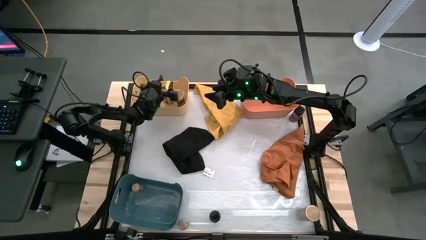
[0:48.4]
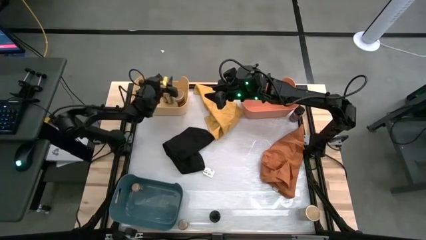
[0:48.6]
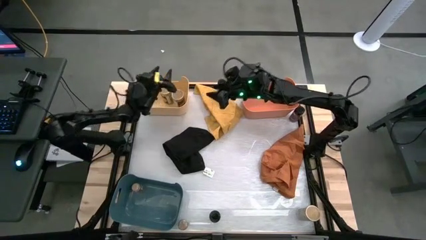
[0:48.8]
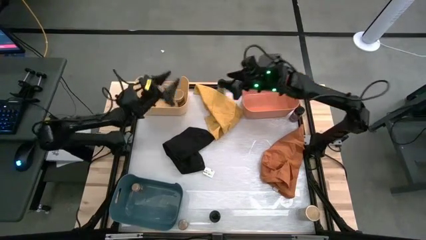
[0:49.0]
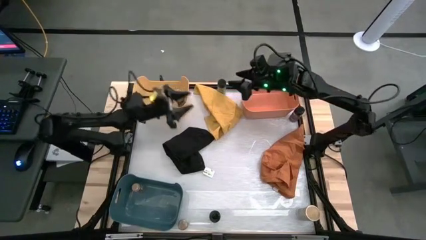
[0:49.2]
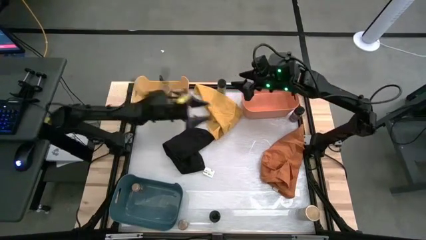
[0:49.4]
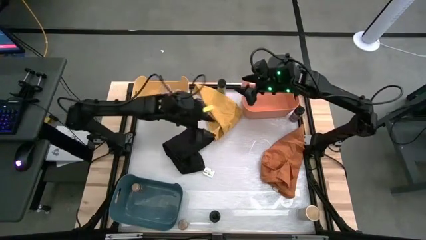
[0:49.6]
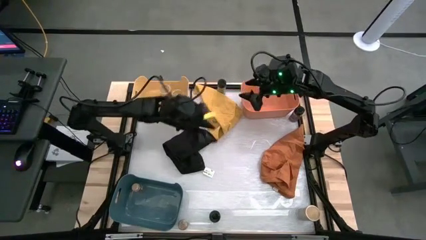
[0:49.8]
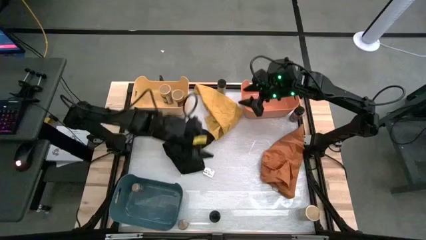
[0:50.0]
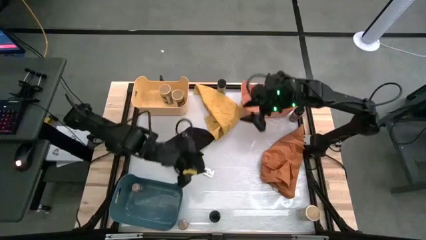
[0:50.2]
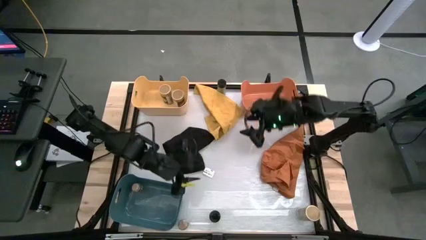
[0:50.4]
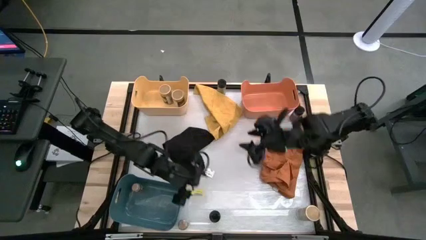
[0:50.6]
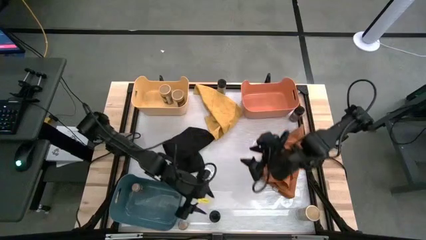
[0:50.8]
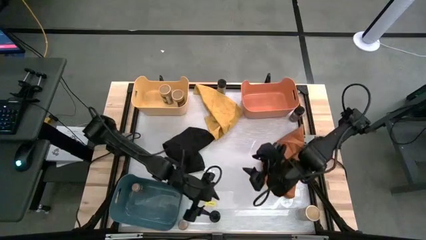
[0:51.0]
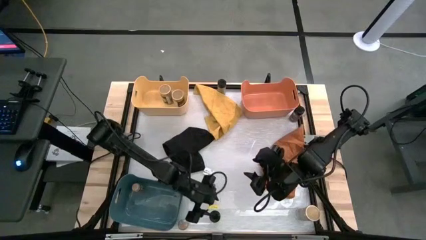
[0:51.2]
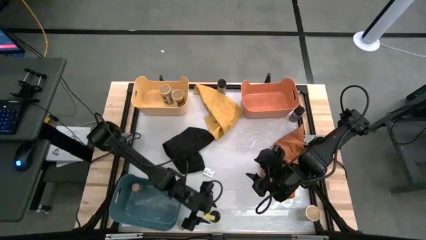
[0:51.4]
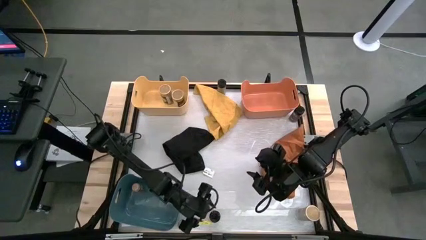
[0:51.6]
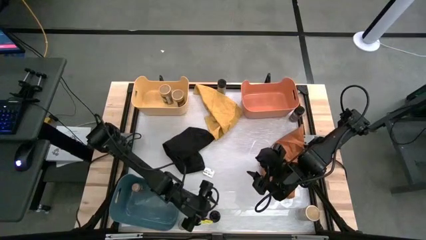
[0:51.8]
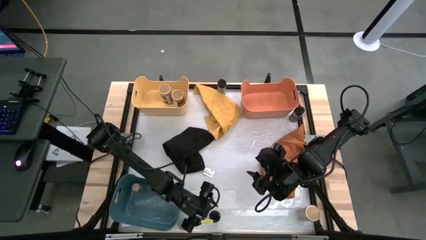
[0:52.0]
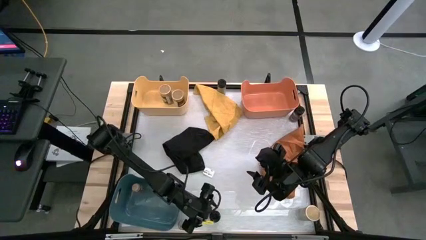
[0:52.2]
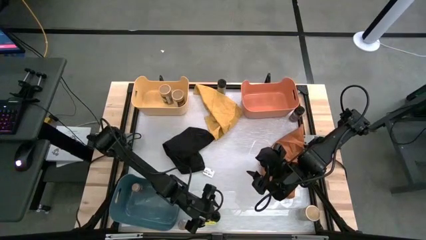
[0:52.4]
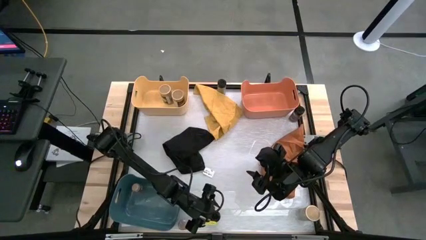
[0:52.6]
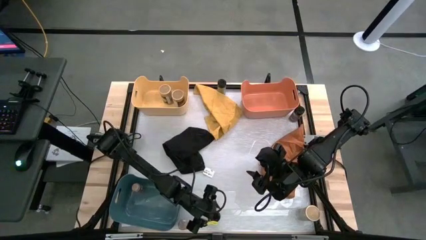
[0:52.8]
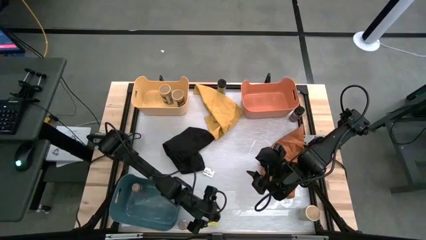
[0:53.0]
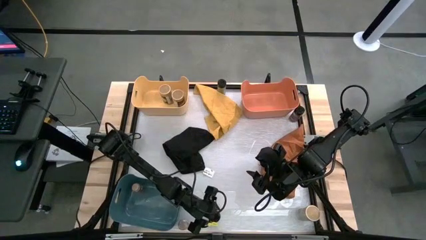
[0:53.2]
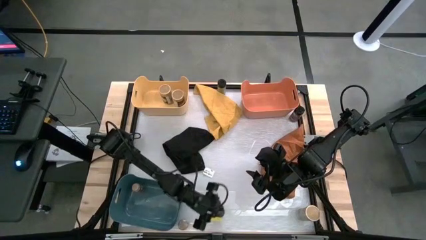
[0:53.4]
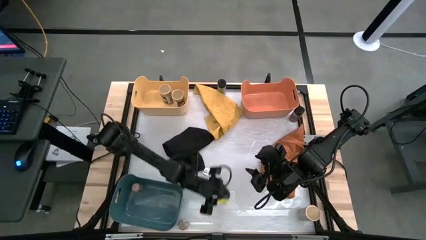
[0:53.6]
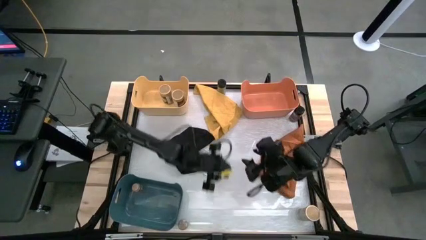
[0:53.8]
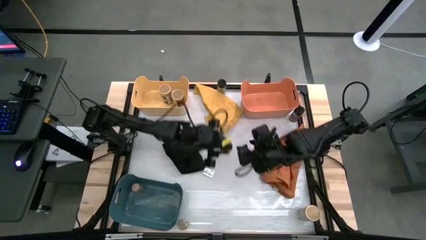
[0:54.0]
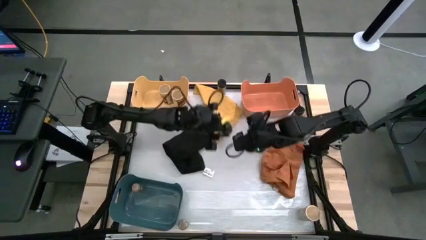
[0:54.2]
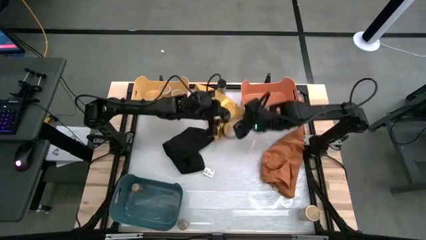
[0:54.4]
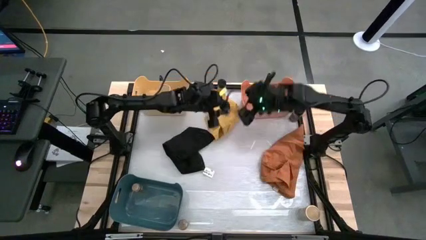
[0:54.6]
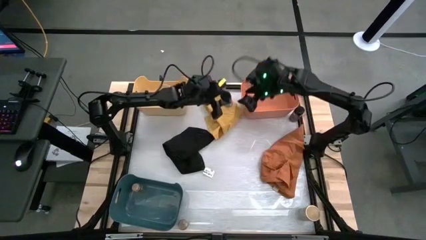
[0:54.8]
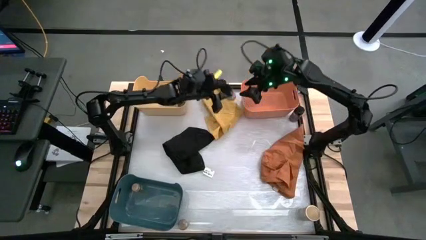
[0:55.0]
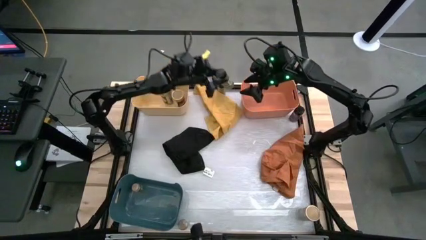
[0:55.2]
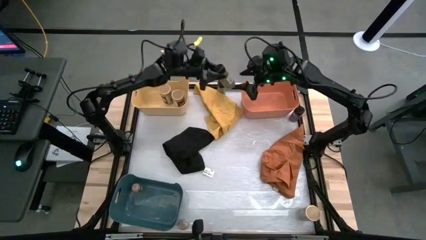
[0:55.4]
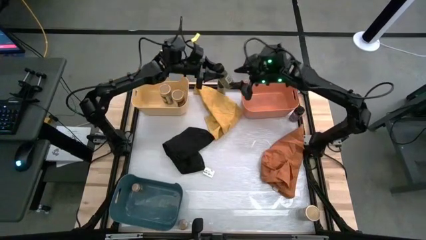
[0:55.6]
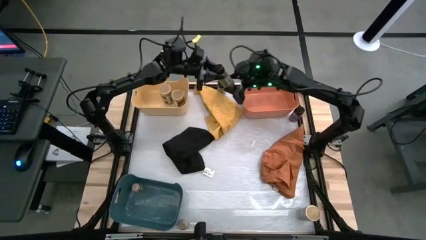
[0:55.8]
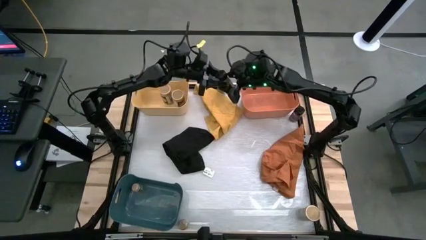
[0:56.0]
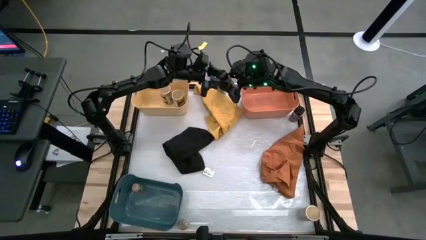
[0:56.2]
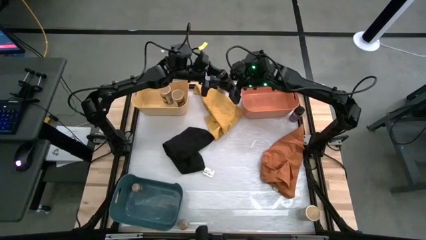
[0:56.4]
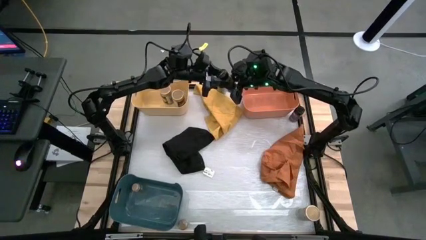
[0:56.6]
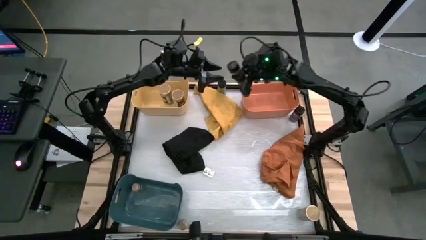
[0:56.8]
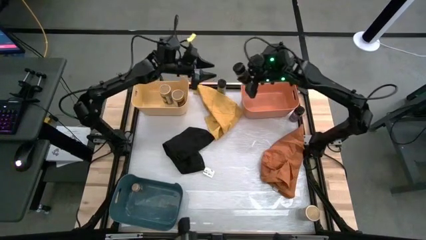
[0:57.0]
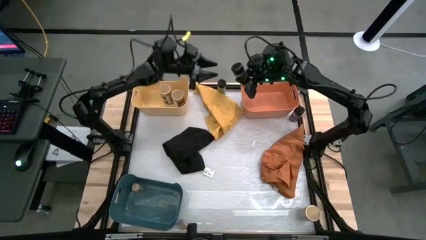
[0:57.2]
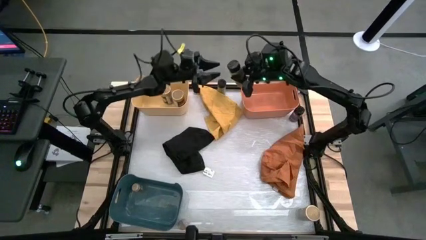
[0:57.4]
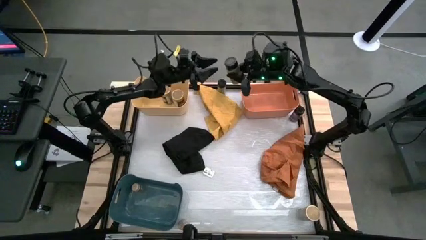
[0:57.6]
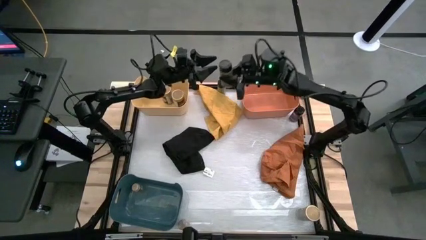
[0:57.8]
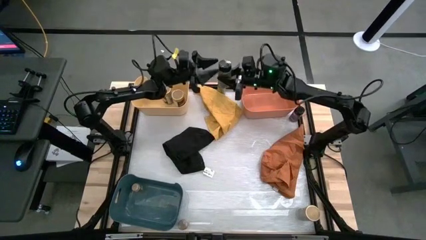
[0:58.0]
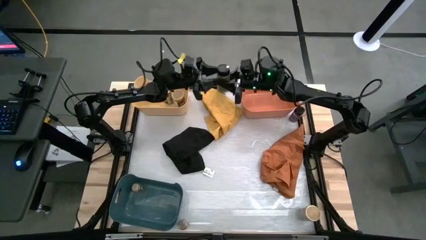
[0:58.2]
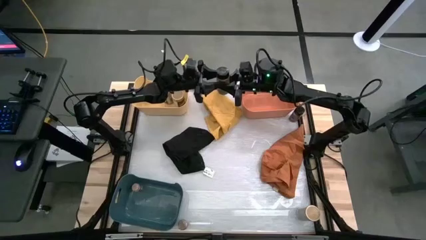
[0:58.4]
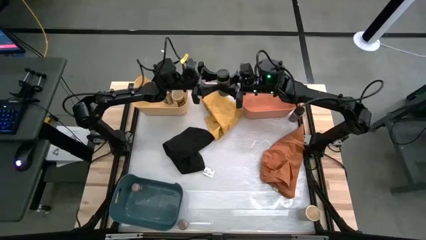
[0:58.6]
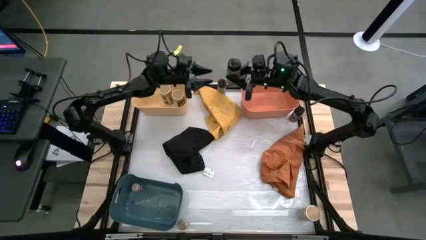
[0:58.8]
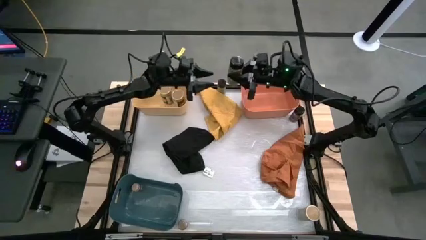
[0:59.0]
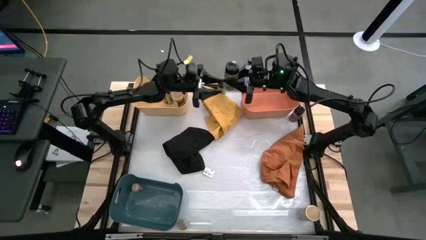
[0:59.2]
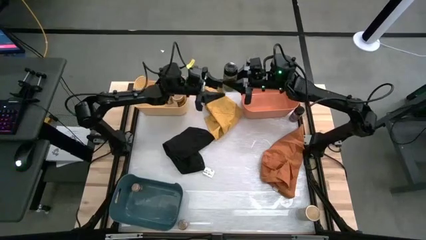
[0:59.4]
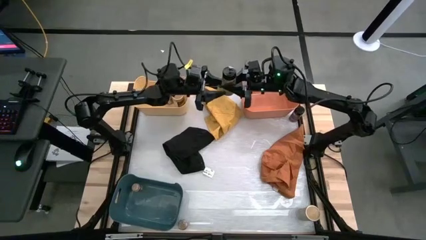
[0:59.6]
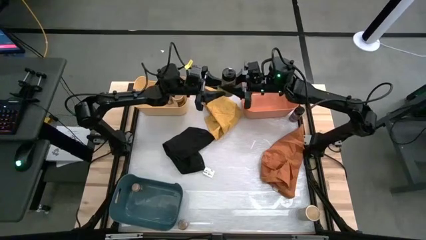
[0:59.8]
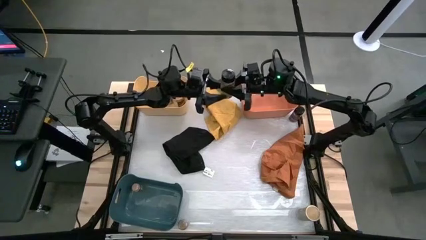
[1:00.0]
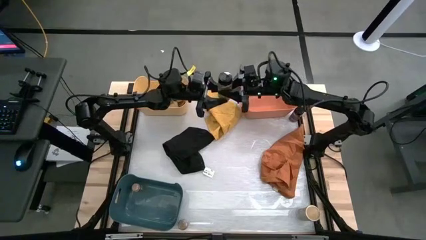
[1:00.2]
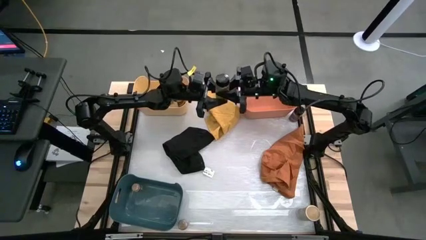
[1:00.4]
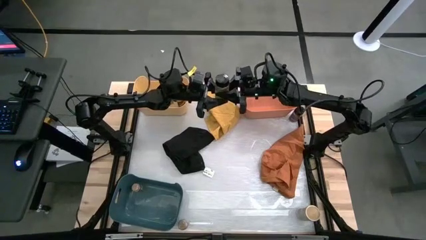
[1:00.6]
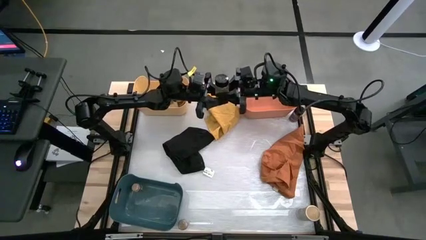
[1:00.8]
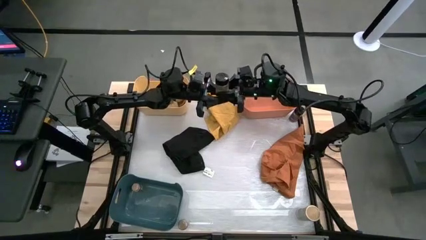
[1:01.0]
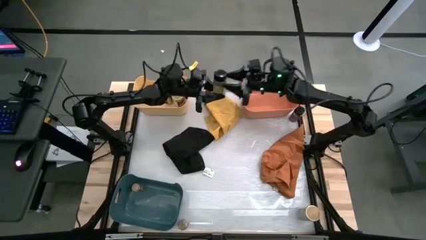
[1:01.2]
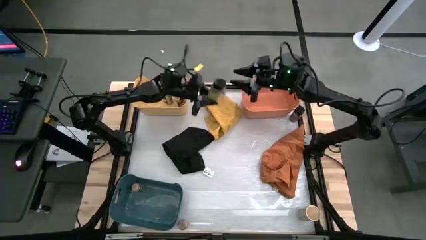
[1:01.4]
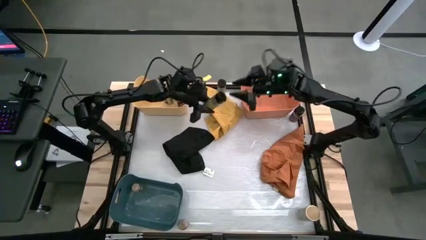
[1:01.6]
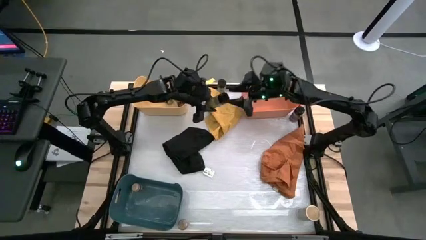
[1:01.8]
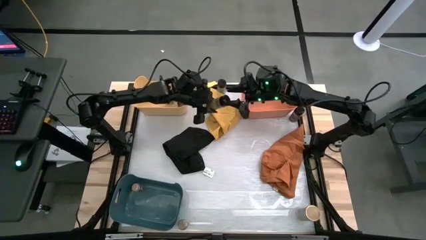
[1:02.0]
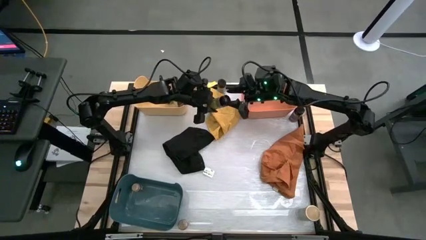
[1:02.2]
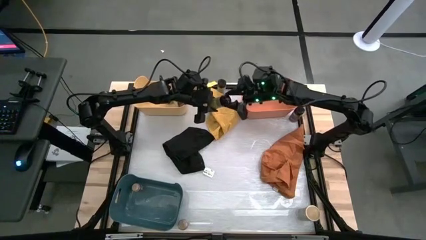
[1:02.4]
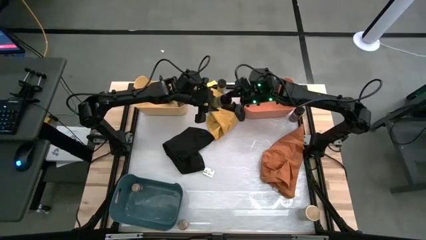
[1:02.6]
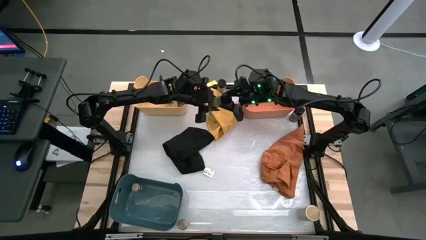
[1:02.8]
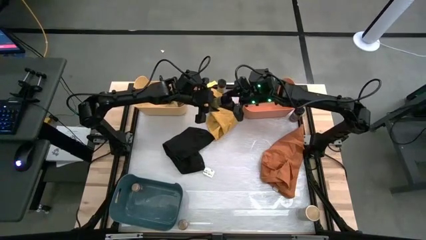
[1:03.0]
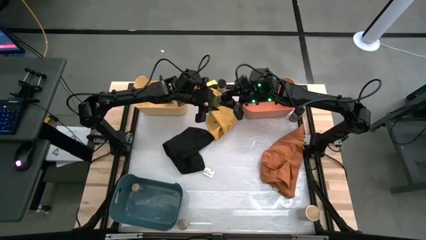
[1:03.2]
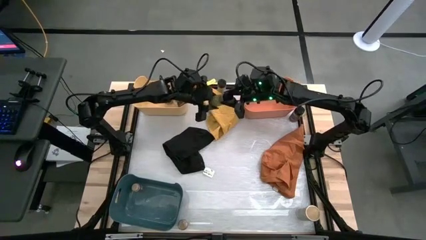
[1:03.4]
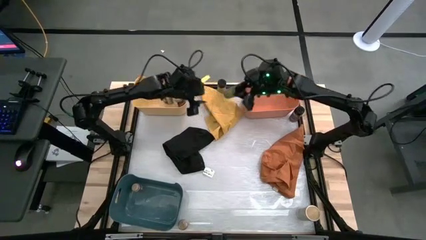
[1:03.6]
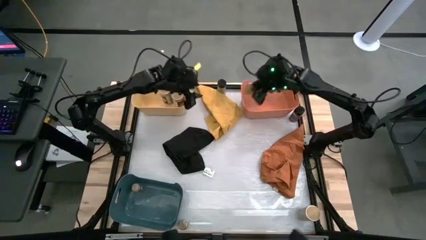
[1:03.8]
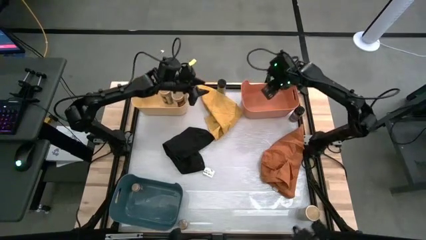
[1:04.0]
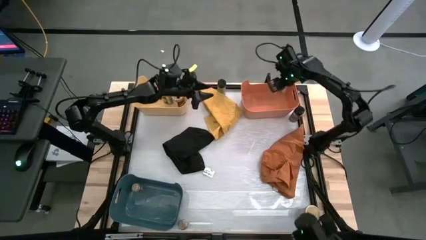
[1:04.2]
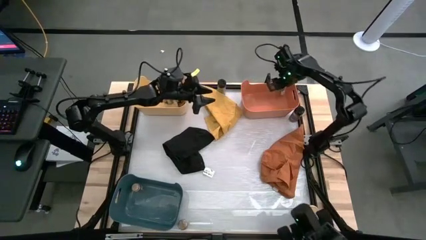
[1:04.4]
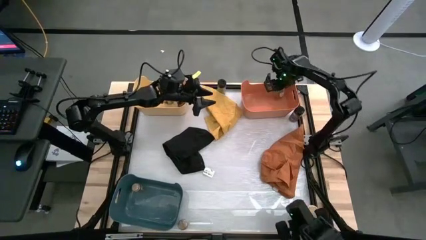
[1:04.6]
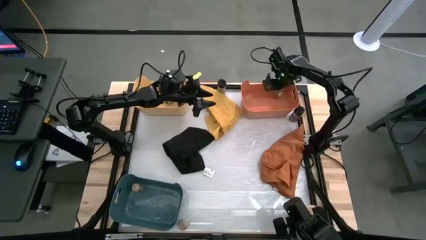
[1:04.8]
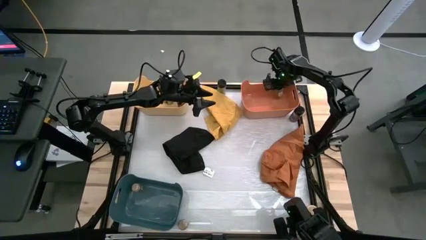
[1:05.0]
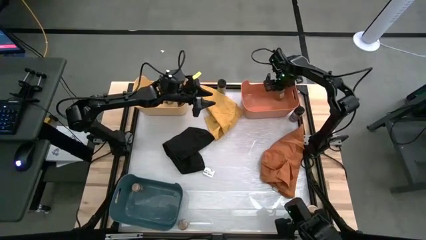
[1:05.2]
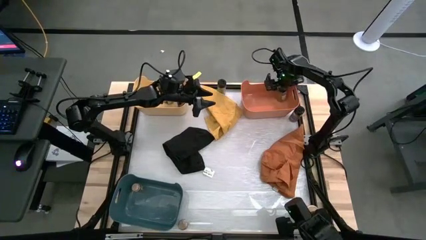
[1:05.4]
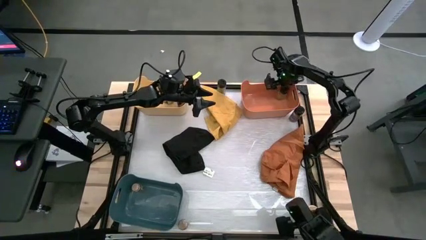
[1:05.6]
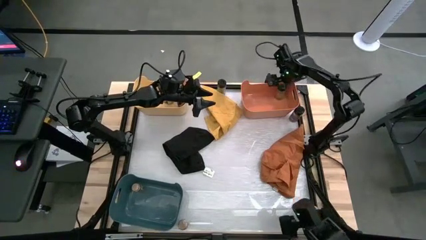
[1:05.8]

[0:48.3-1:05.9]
Task: Sort spices by type
Put the bottom black seasoning bottle into the orange bin
